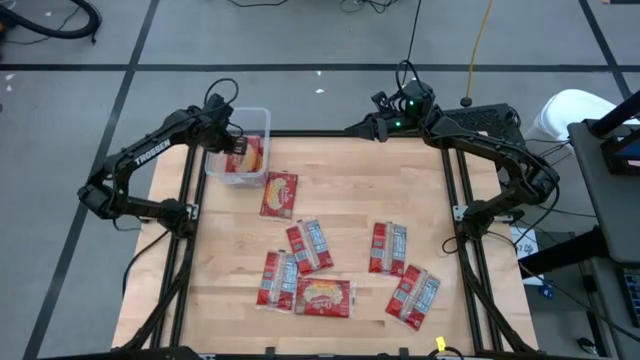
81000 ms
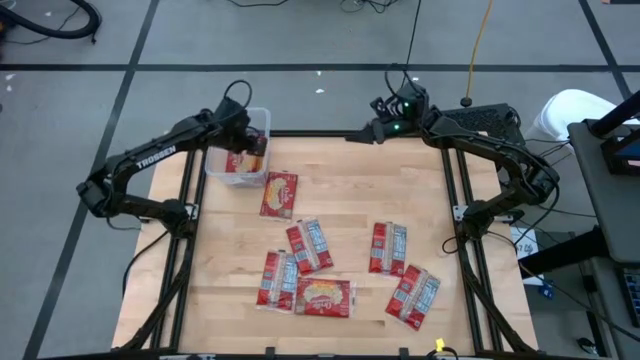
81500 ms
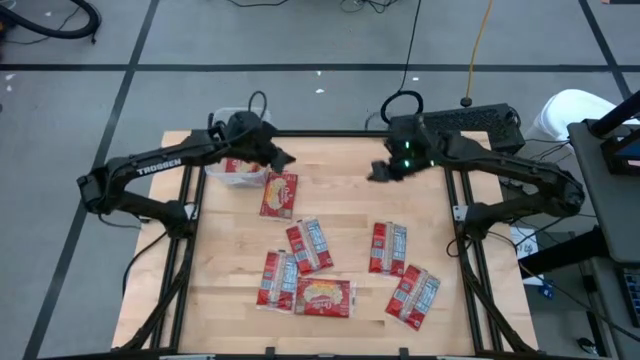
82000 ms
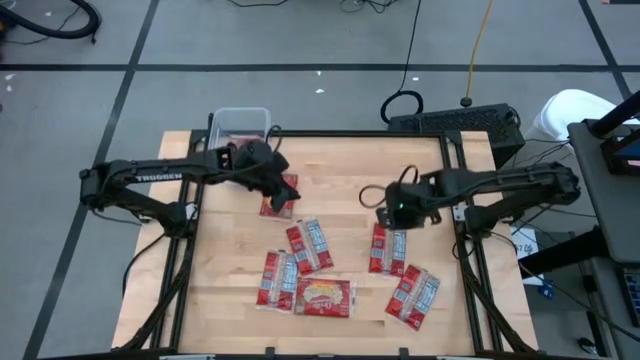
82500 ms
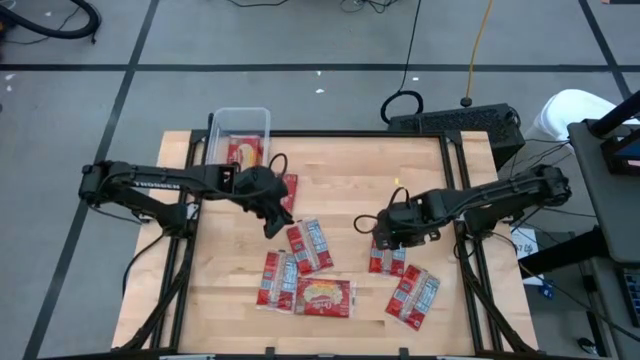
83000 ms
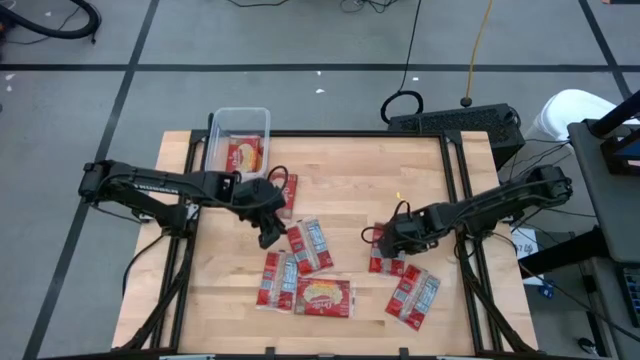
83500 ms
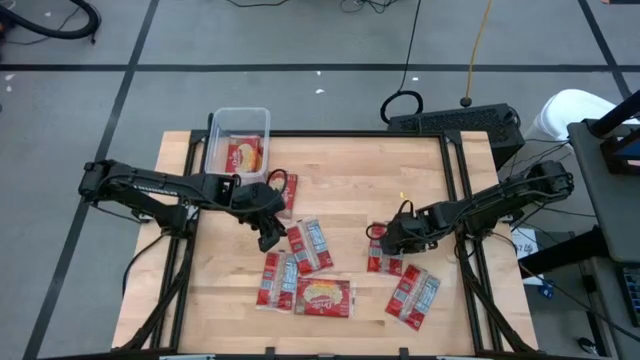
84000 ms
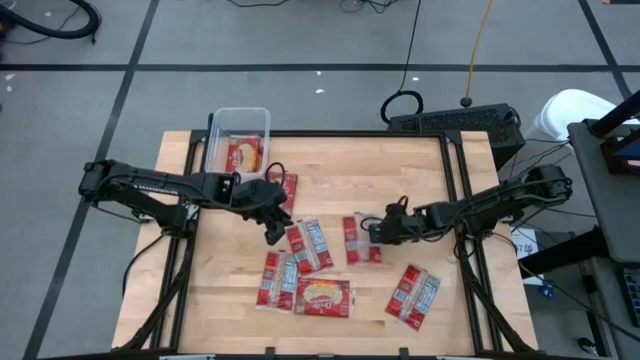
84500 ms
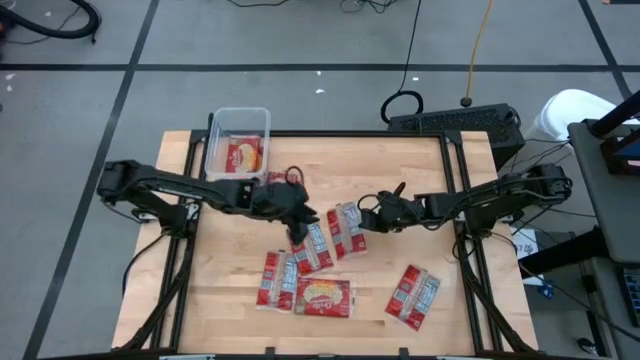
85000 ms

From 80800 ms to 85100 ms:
Task: Sort popcorn bags into baskets
Put the red popcorn bag into the transparent container

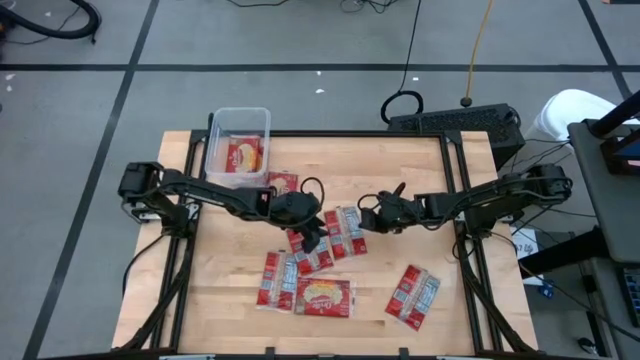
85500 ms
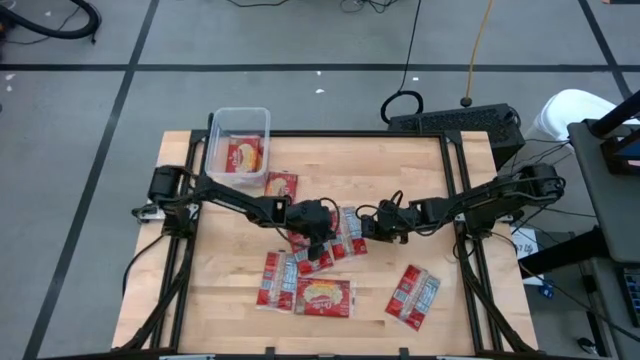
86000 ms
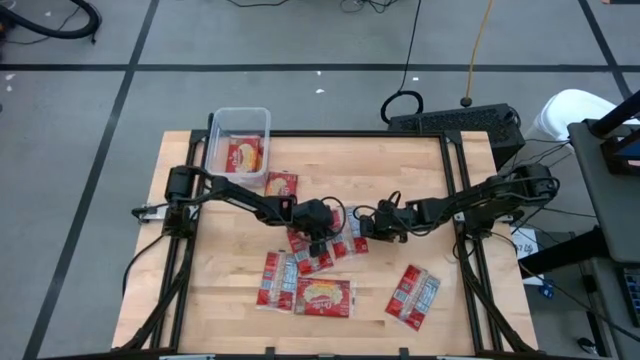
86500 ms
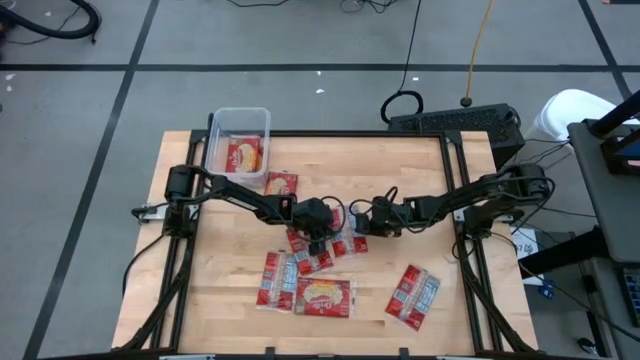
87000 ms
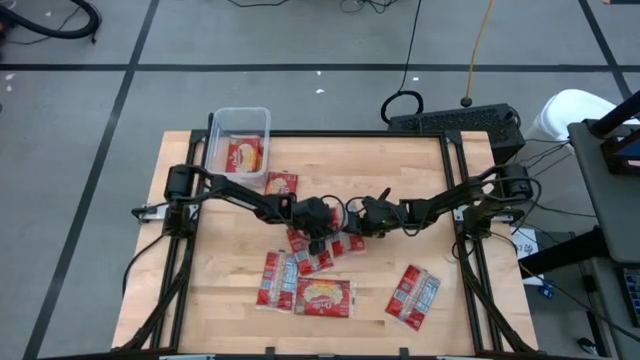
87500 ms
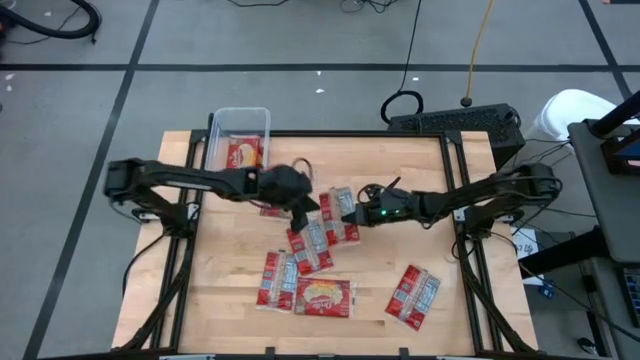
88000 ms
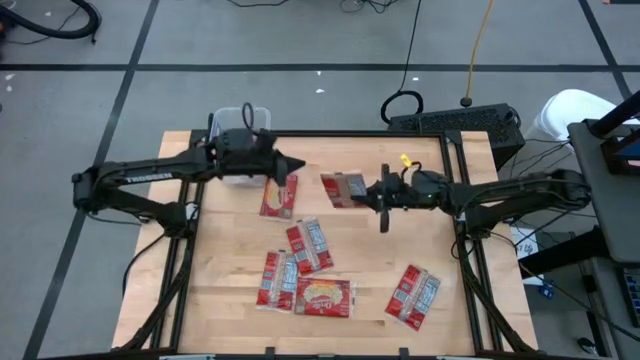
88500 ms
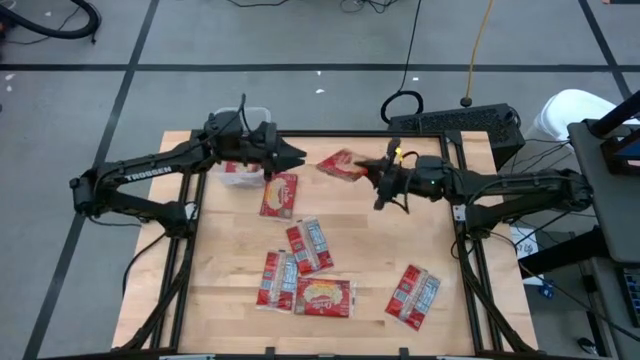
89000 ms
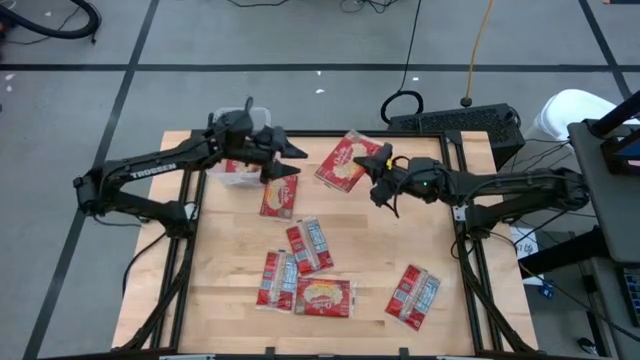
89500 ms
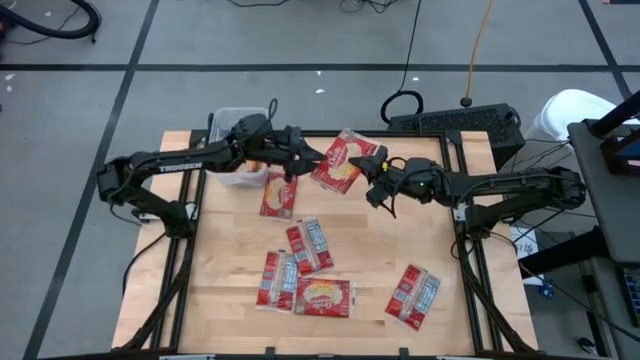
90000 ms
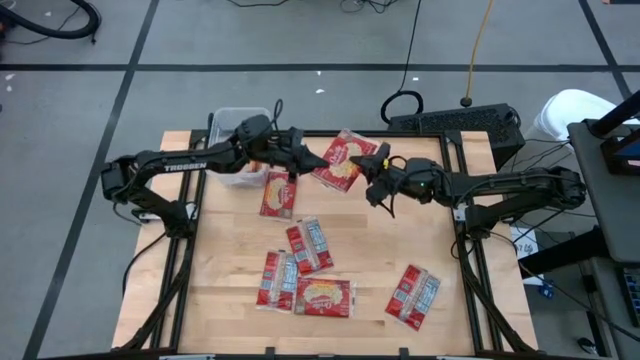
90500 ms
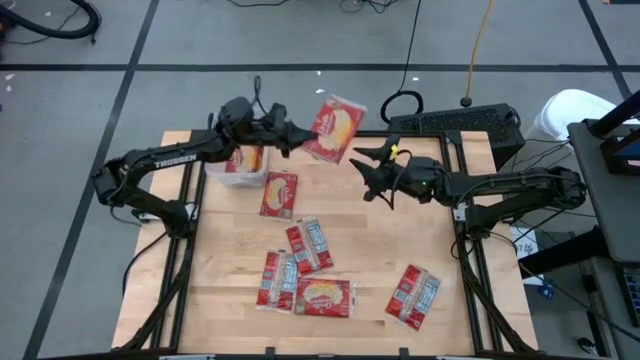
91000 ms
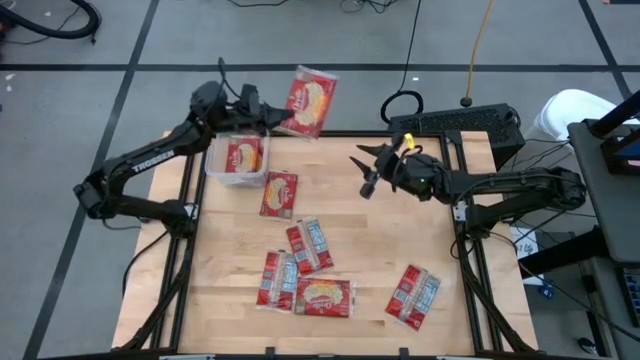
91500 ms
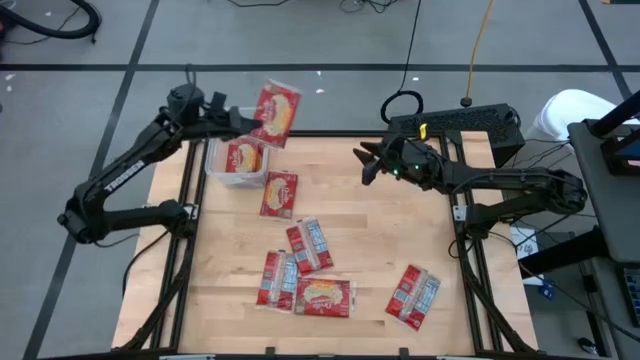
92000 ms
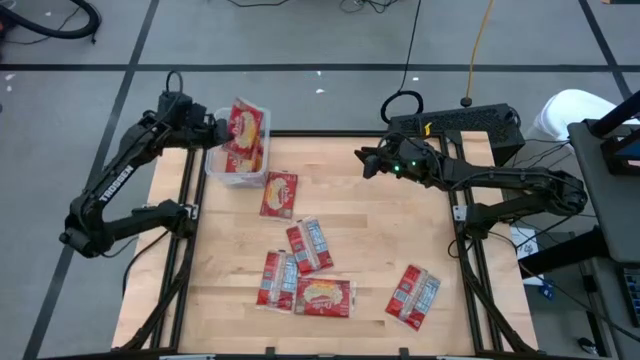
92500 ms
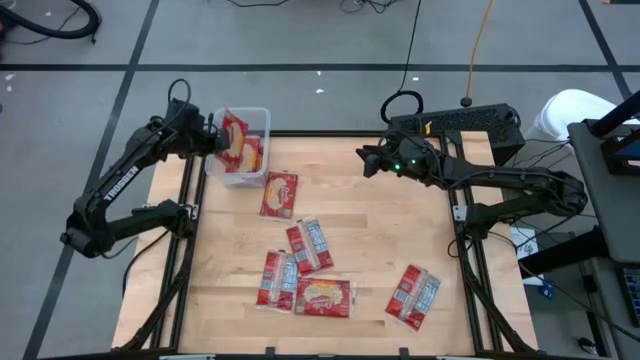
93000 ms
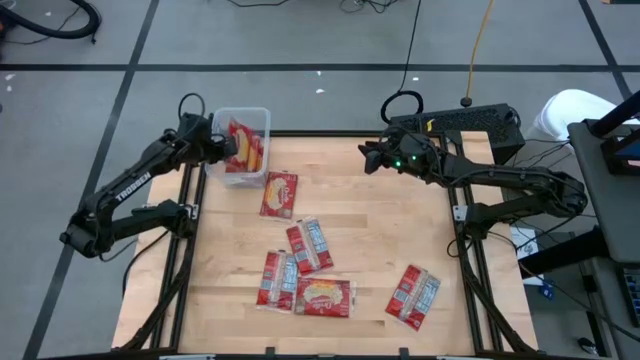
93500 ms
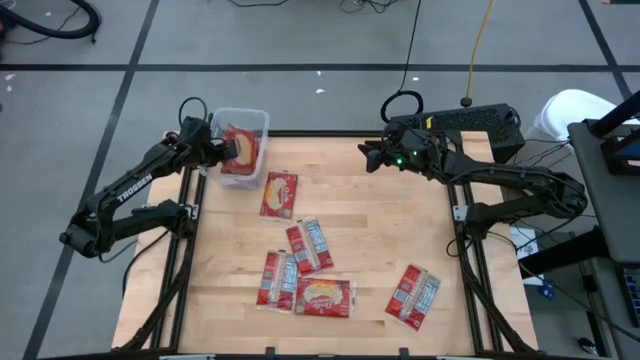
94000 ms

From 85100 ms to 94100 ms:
Put the red popcorn bag into the transparent container

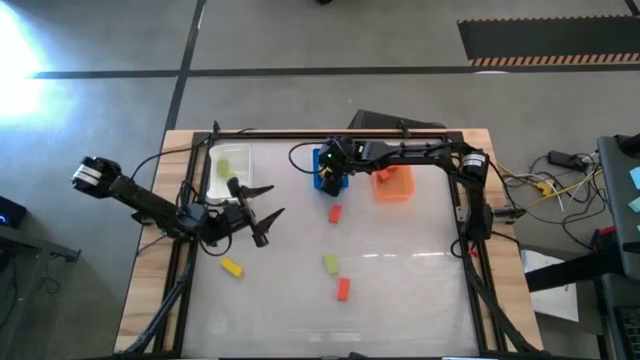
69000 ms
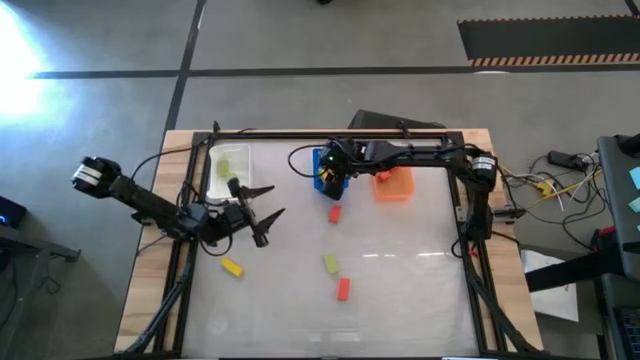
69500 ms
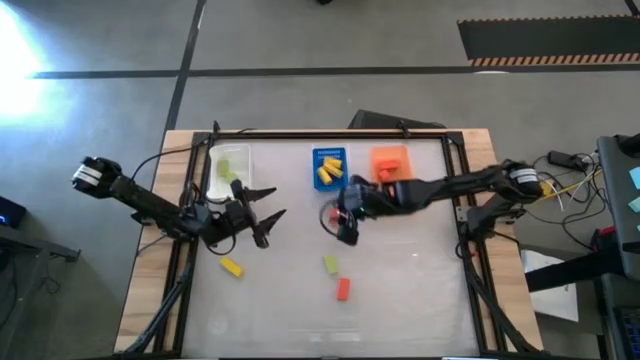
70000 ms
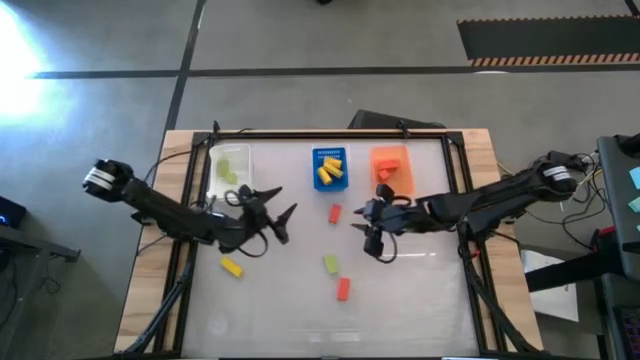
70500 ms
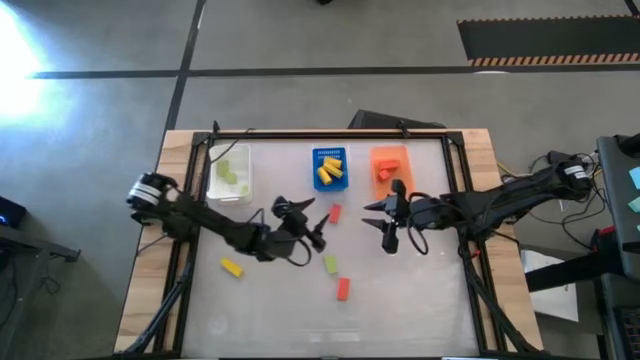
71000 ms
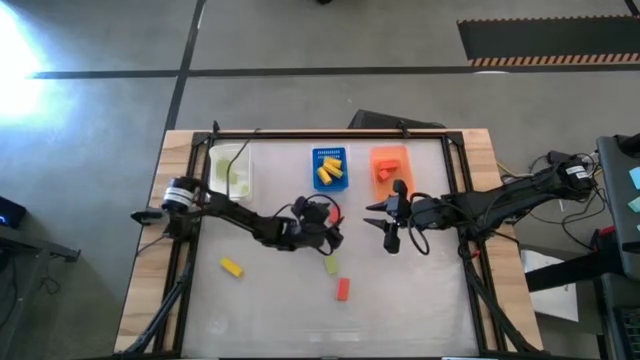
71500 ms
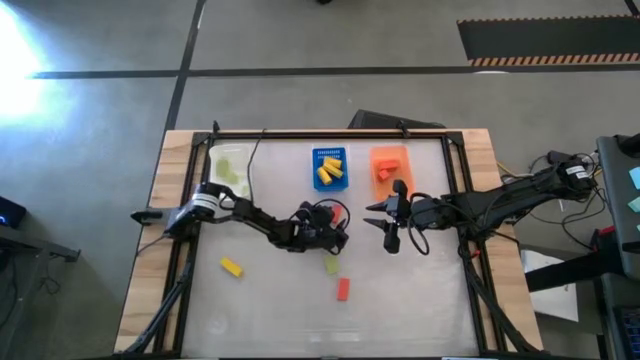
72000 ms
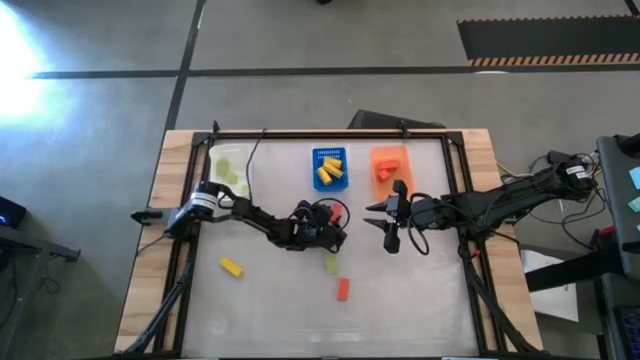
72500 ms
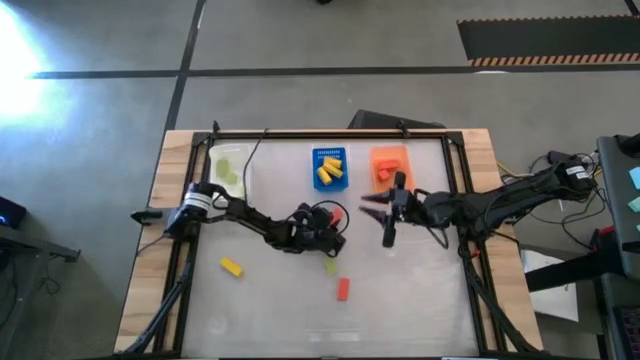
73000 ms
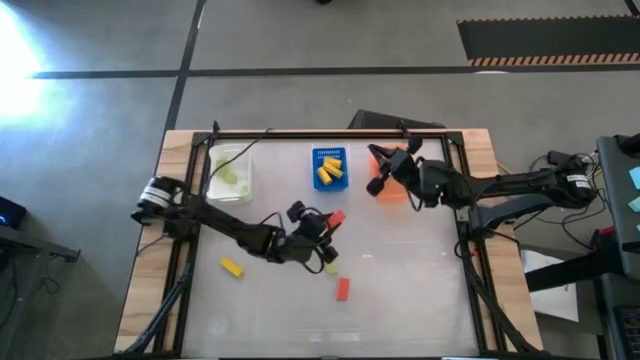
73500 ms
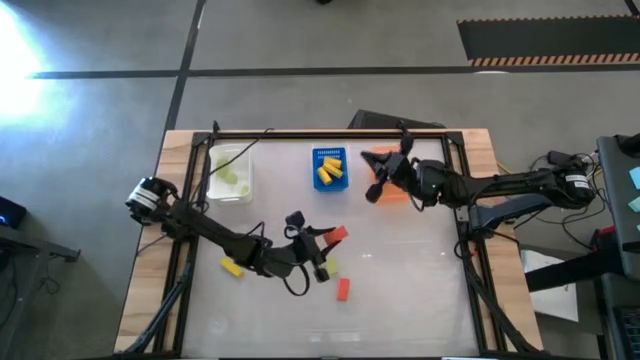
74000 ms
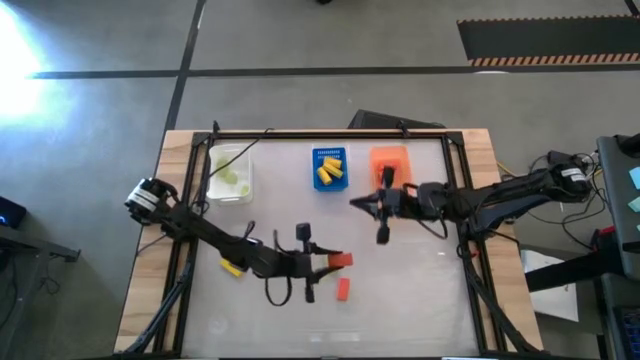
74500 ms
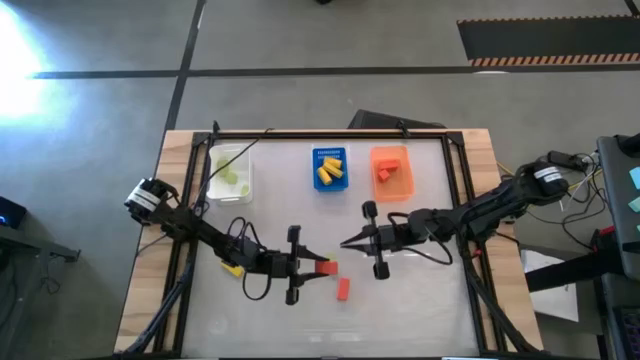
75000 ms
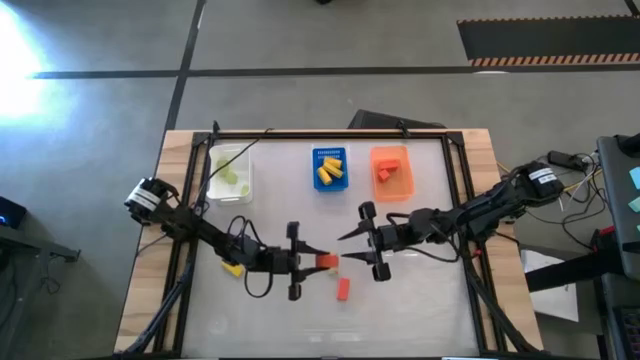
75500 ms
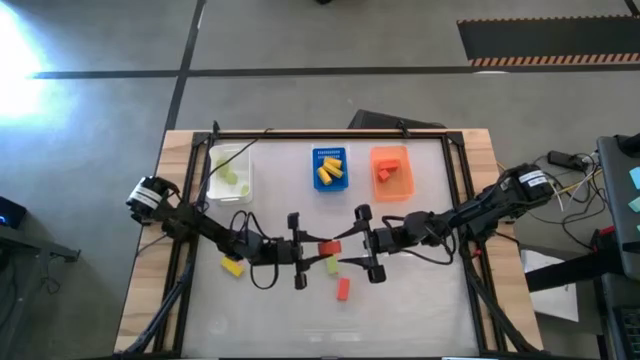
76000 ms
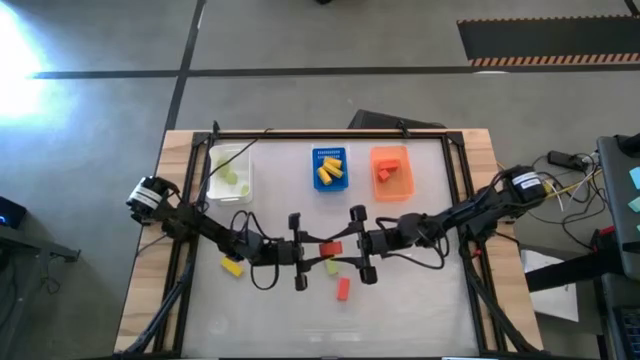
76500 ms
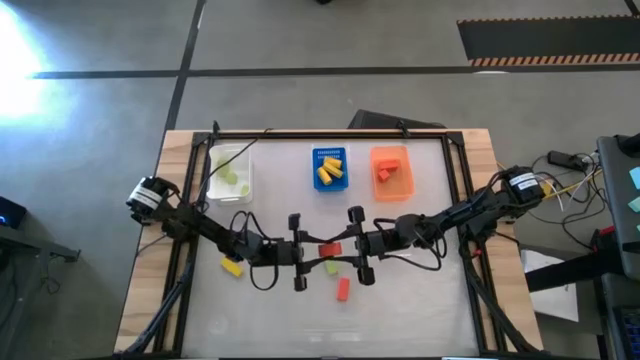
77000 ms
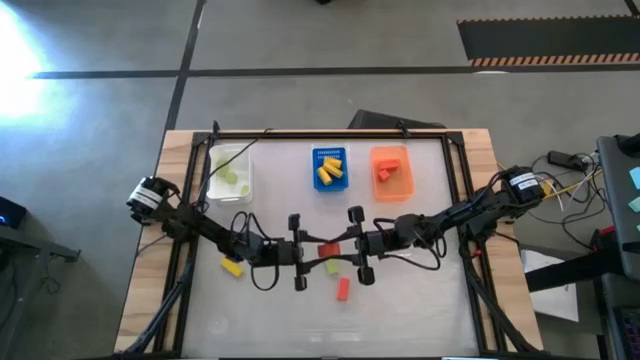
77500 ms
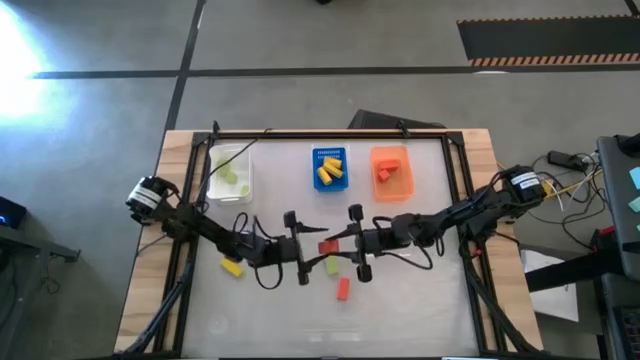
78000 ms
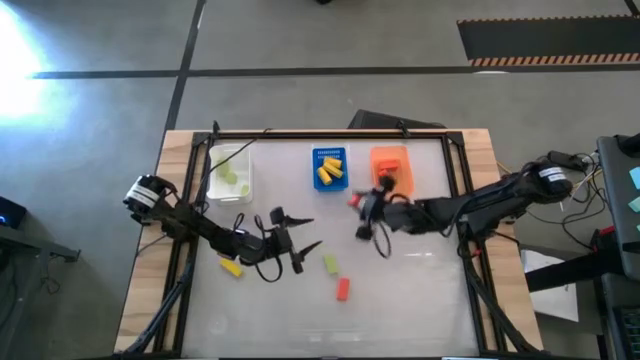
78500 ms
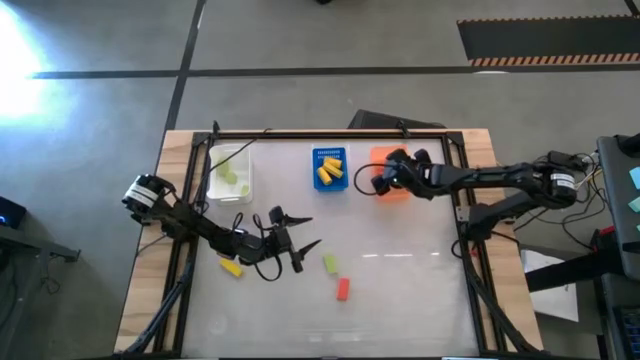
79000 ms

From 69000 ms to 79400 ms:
Task: Sort & place blocks by color
Put the orange block into the orange bin
